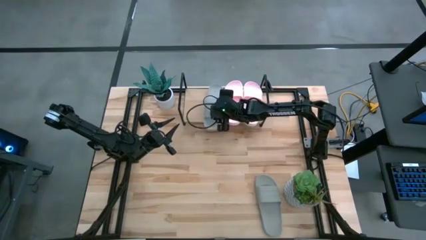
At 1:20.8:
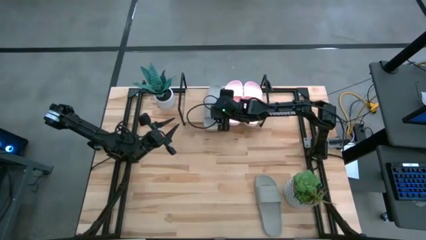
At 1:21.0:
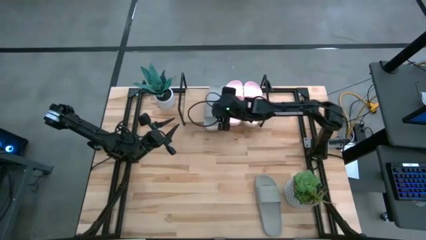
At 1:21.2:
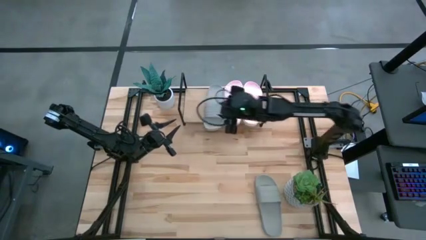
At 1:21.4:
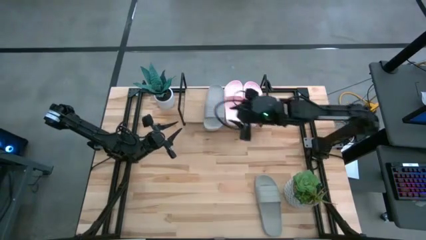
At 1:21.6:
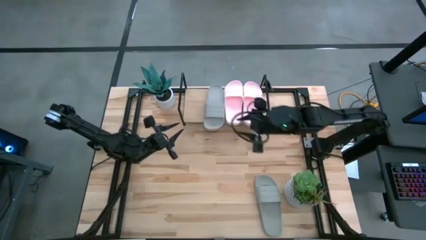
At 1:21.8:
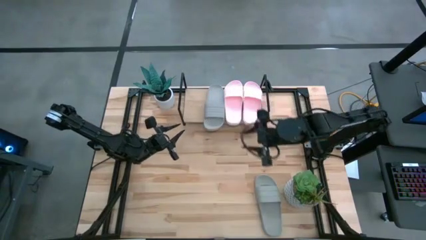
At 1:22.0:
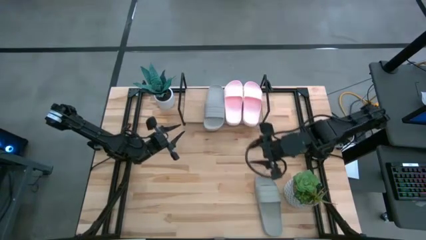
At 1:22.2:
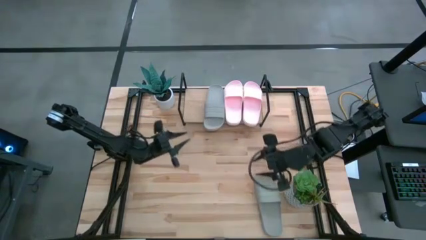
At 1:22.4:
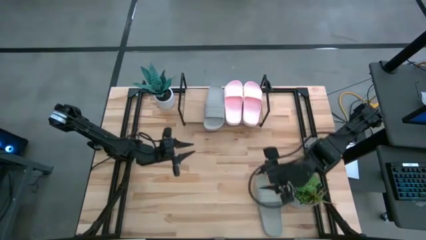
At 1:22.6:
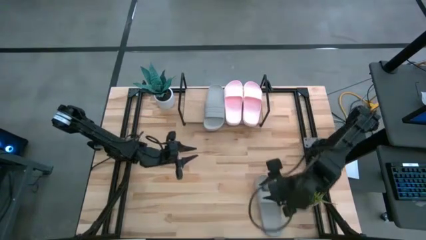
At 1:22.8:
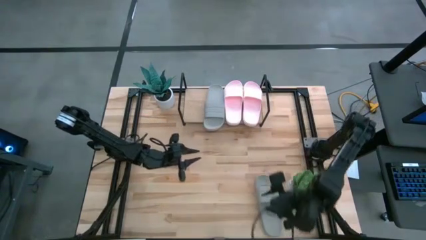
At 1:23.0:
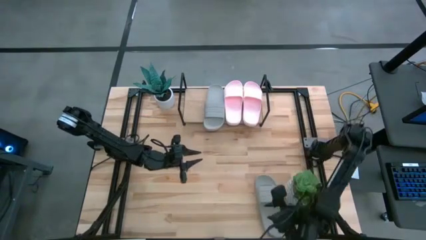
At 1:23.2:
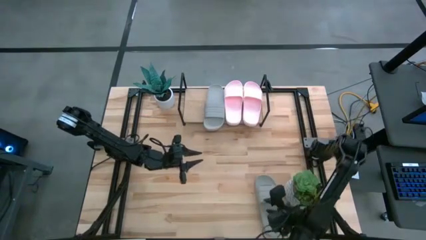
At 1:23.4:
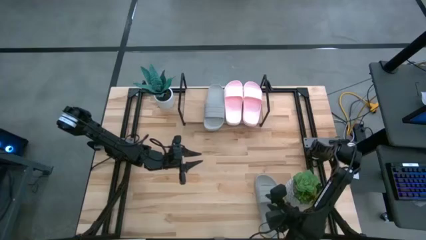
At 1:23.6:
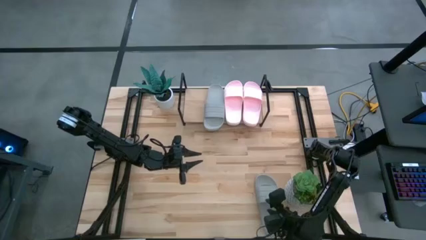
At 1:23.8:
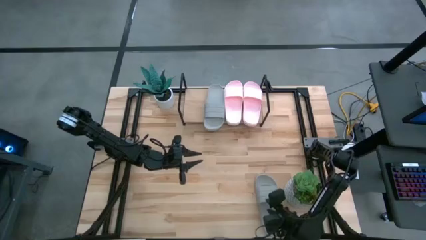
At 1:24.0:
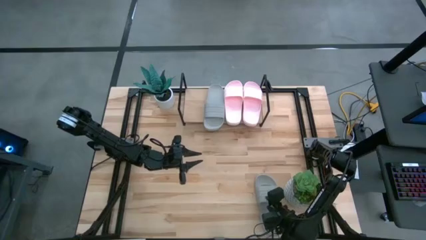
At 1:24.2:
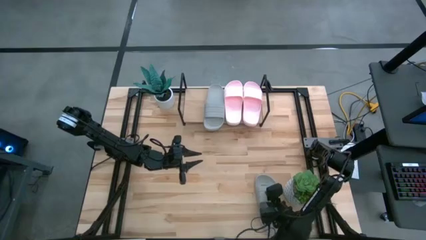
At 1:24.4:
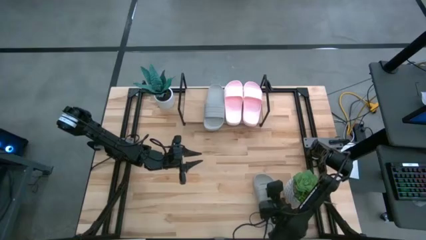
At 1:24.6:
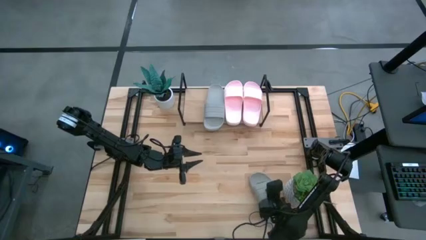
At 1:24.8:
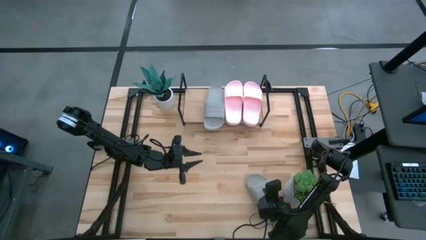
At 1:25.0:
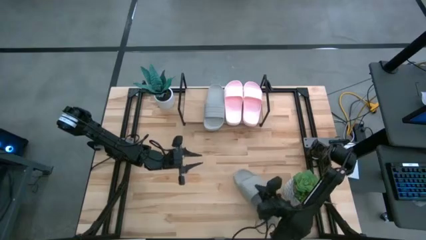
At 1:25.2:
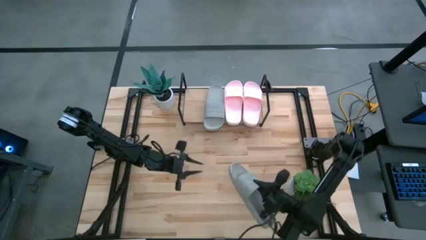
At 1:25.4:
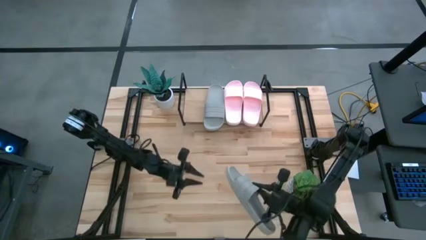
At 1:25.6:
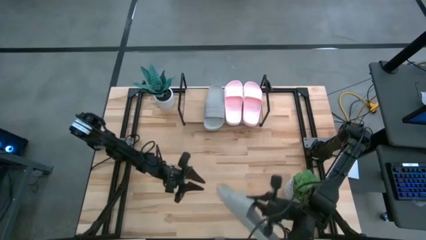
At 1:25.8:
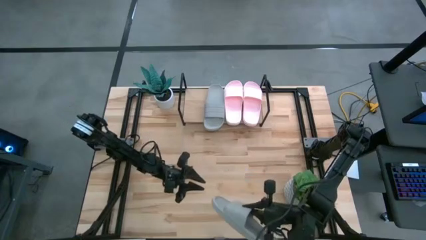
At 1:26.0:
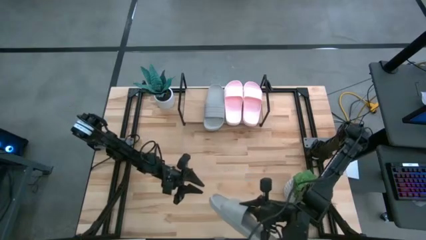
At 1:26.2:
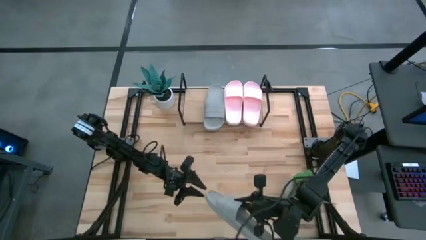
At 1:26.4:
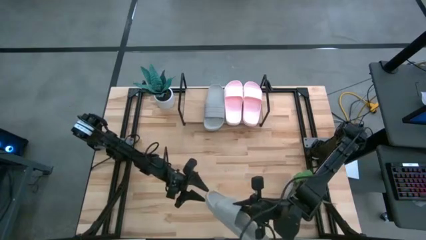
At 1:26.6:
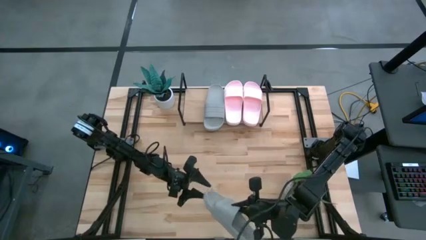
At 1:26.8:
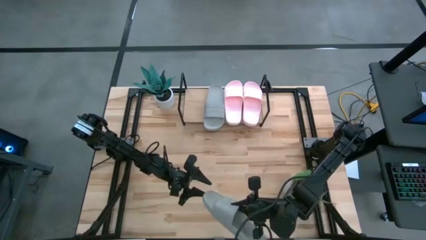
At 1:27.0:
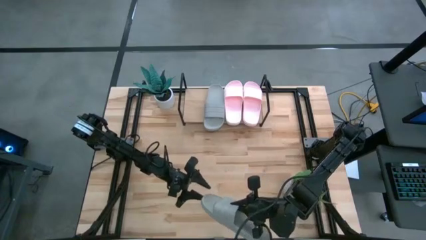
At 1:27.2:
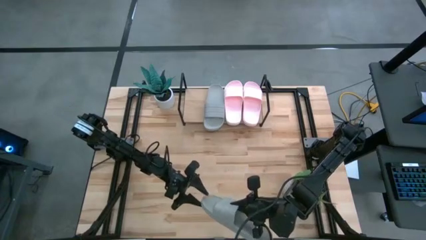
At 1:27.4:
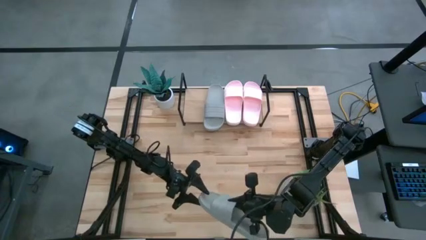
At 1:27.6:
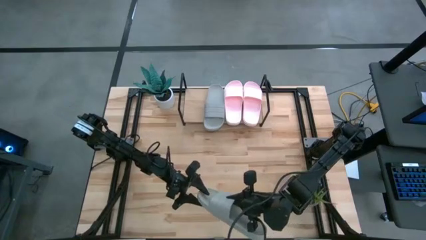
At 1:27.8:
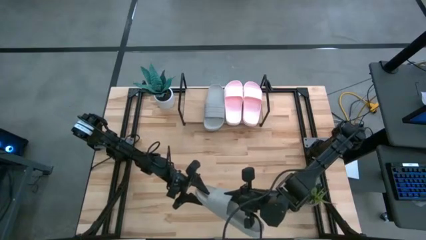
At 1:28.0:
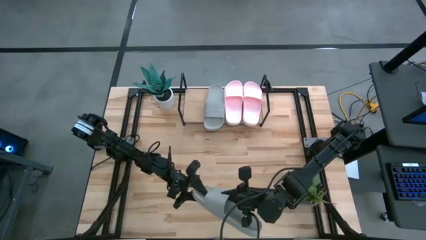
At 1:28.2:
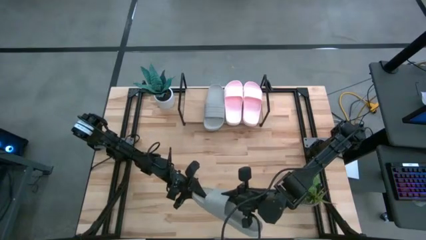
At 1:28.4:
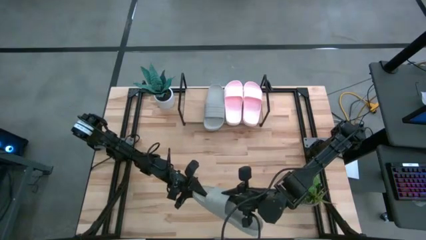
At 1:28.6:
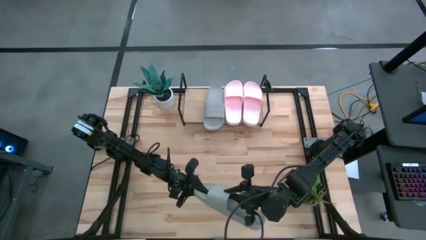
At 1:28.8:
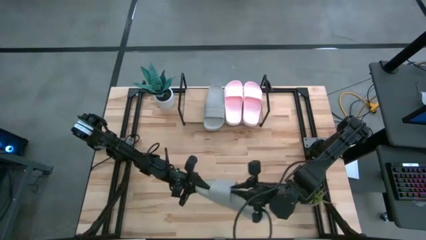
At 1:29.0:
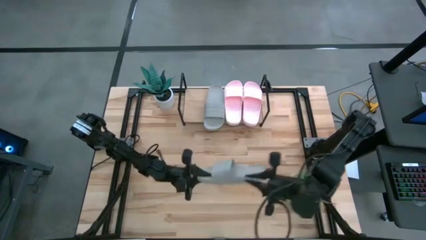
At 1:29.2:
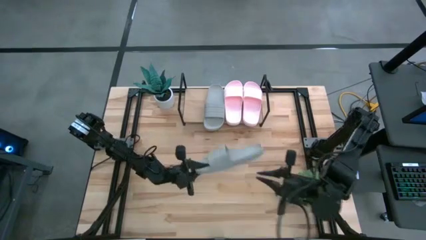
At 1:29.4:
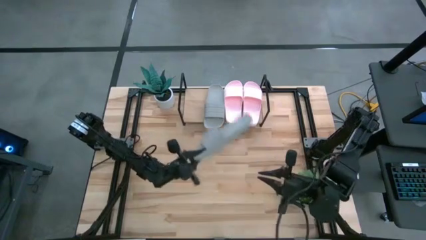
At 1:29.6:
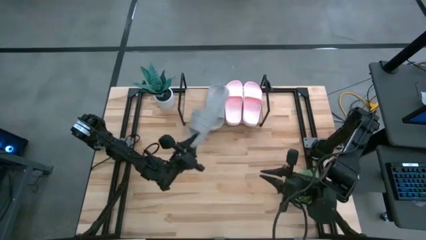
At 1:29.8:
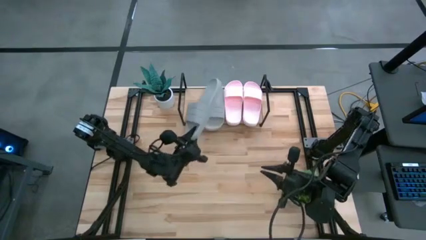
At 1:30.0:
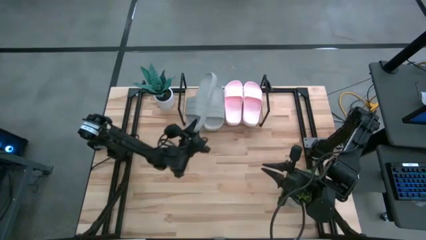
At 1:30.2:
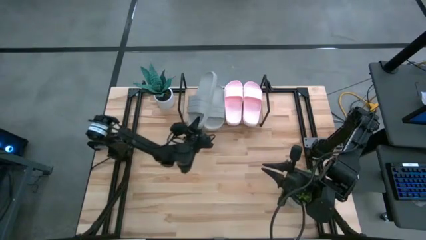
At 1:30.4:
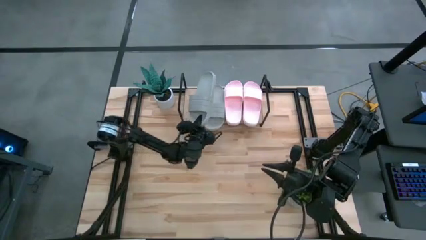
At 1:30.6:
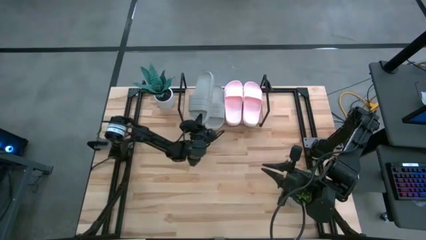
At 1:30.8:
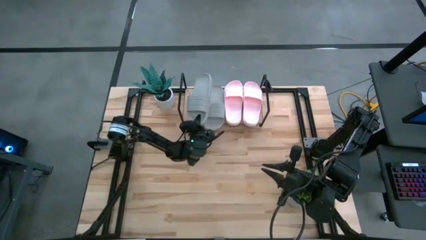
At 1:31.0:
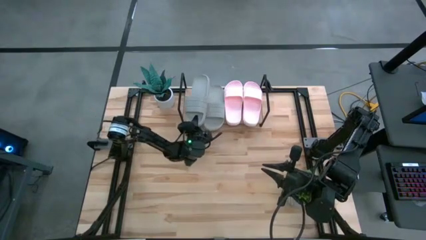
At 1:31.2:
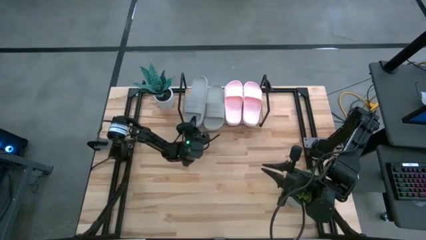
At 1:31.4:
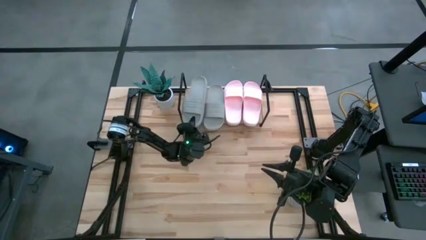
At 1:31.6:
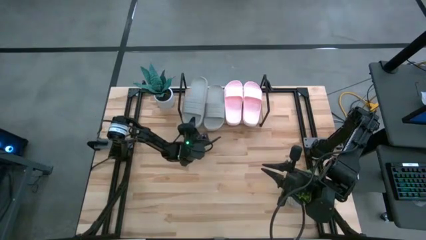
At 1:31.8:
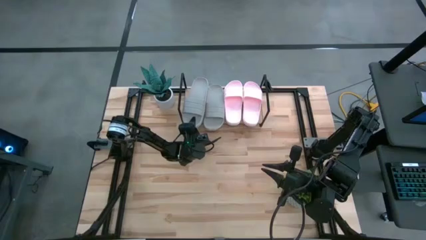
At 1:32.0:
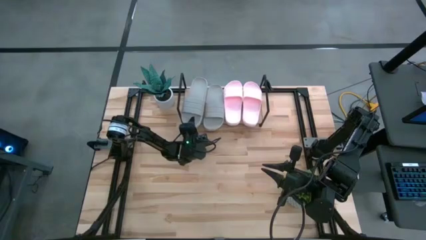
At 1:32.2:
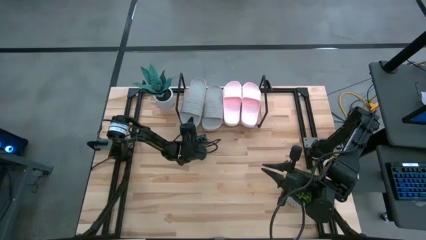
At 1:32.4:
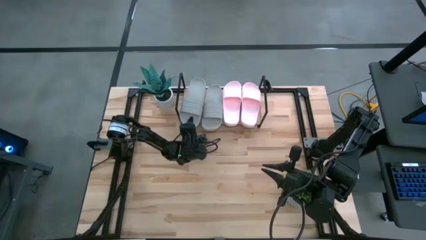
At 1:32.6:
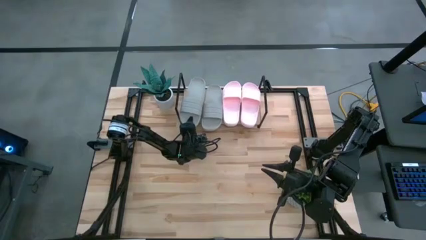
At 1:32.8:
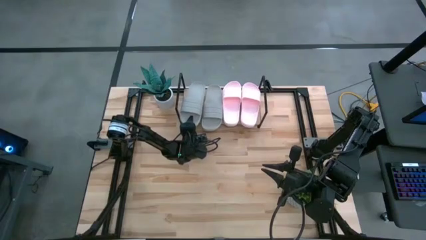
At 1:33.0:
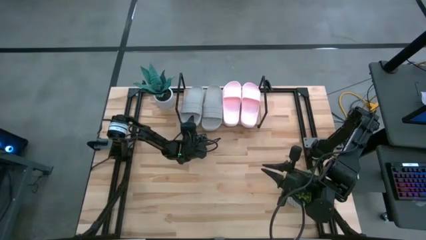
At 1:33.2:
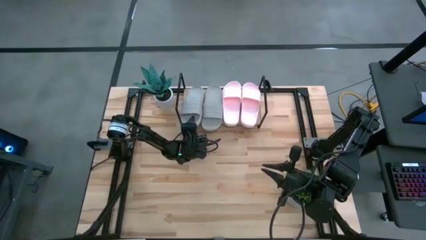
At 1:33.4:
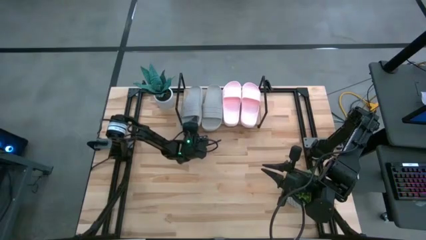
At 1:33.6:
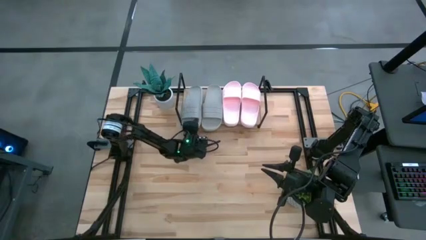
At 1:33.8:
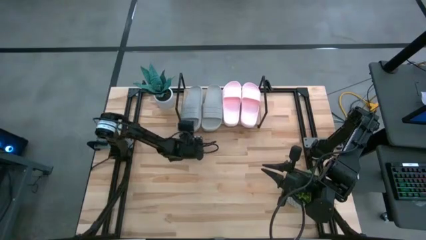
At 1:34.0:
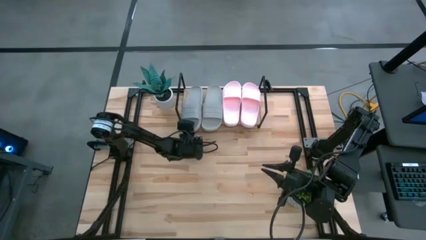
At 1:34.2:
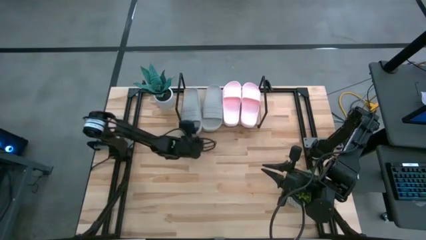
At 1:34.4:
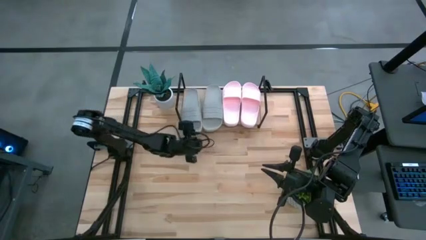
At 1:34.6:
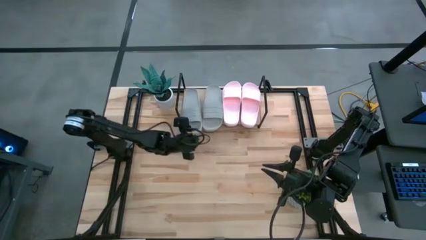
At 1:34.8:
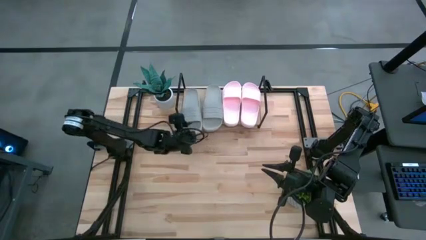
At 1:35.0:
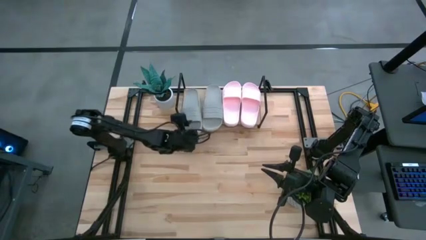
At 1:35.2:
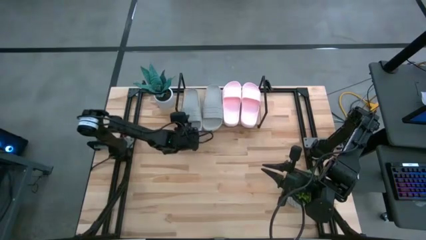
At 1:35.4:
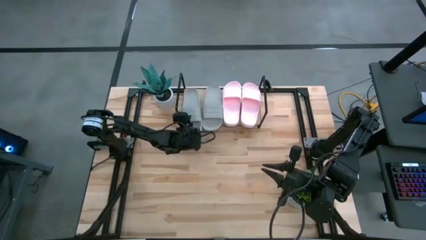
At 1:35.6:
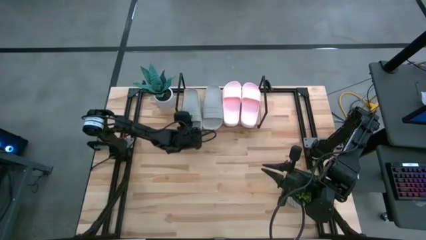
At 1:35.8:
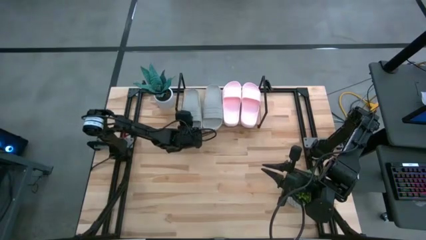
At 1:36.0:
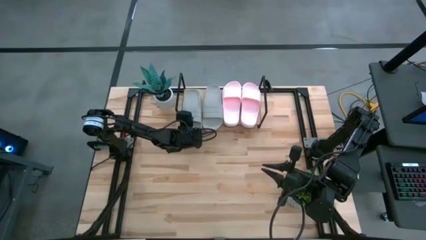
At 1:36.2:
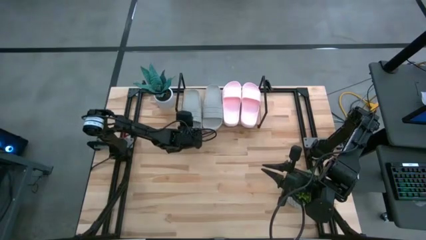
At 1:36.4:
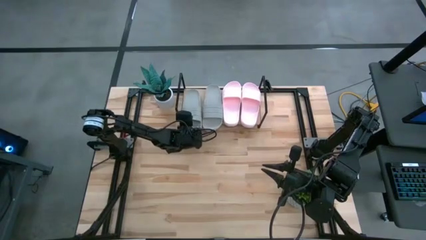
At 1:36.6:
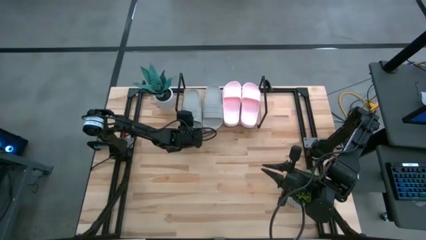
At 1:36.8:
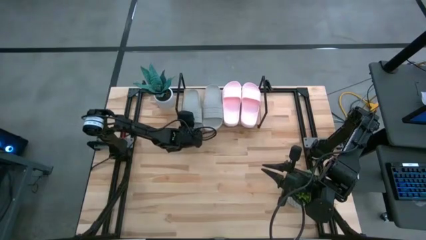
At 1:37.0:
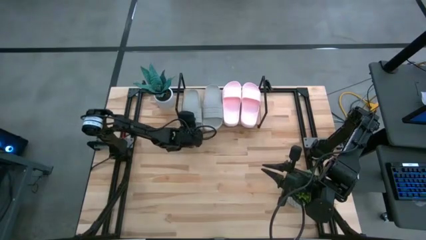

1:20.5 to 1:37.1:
Task: Pick and place slides into the shelf
Put the gray slide on the shelf
